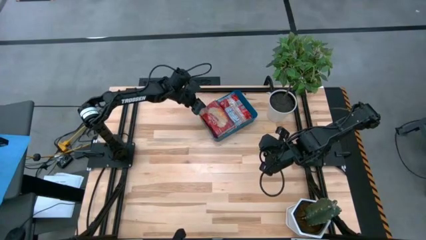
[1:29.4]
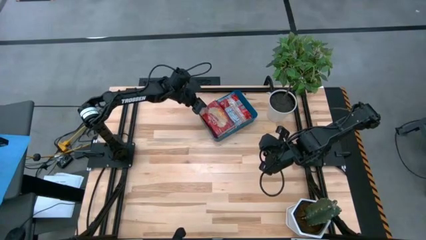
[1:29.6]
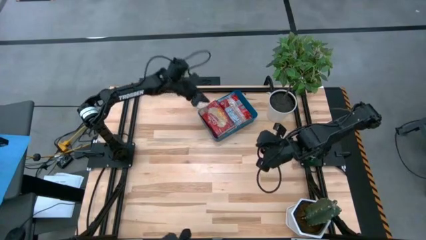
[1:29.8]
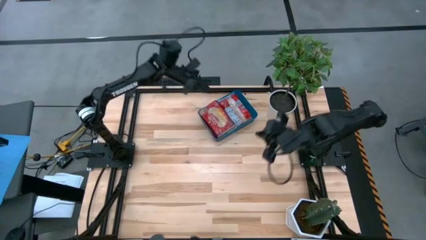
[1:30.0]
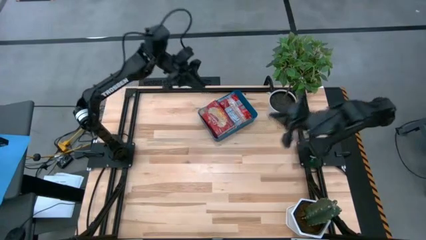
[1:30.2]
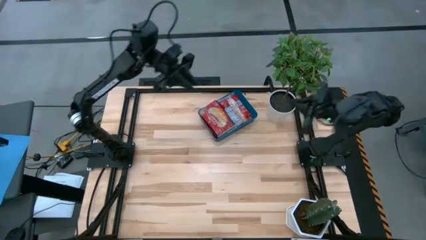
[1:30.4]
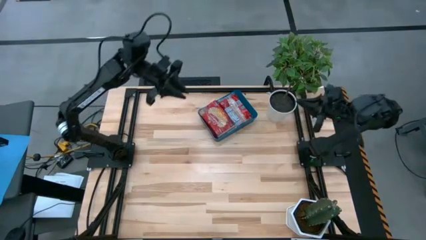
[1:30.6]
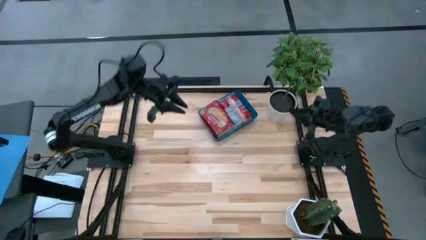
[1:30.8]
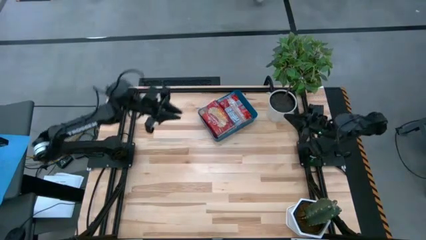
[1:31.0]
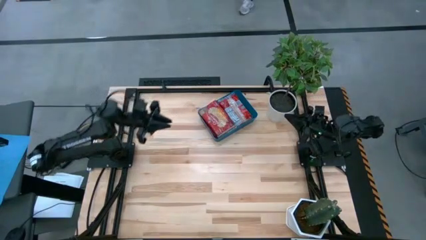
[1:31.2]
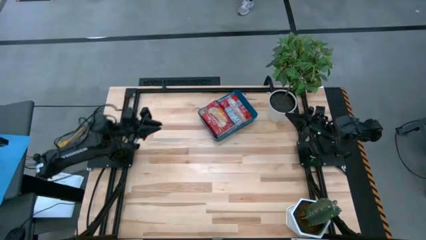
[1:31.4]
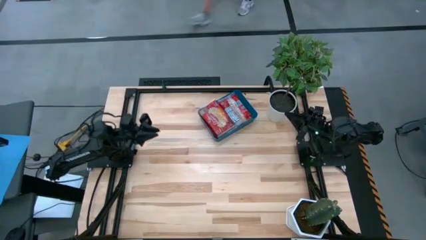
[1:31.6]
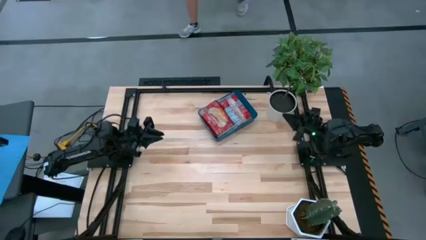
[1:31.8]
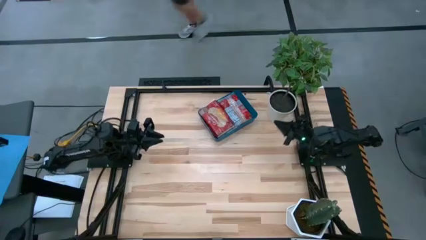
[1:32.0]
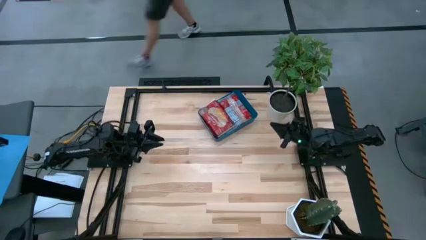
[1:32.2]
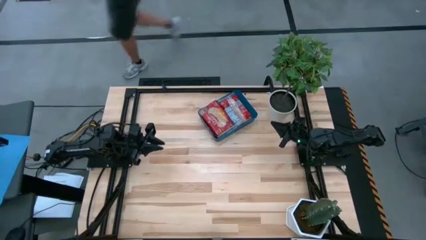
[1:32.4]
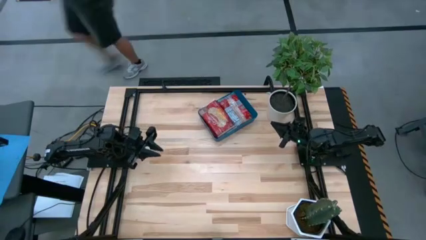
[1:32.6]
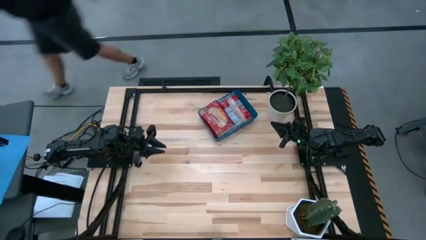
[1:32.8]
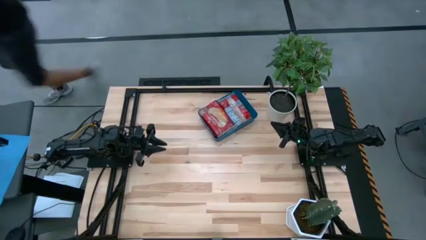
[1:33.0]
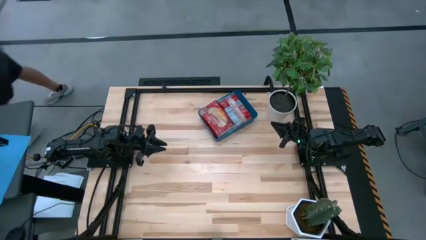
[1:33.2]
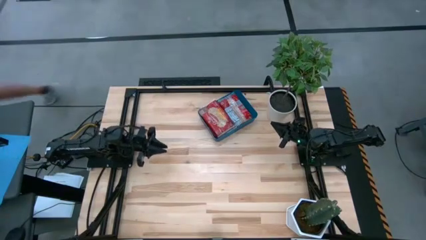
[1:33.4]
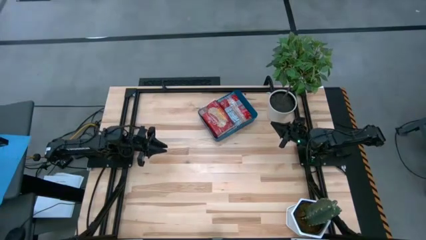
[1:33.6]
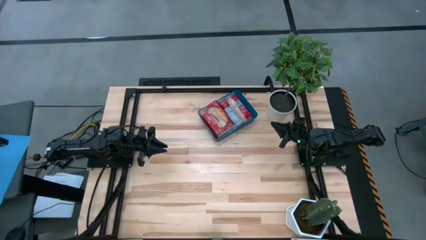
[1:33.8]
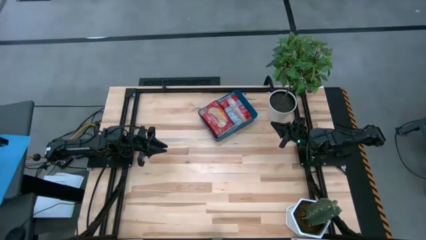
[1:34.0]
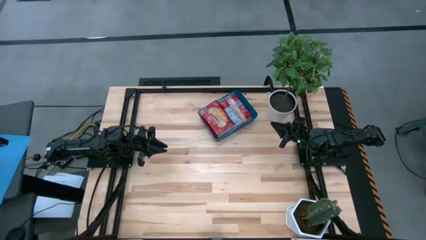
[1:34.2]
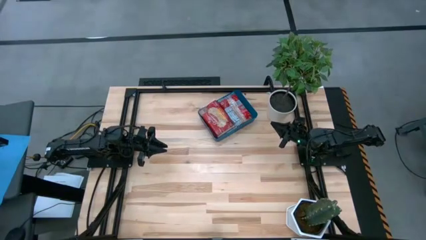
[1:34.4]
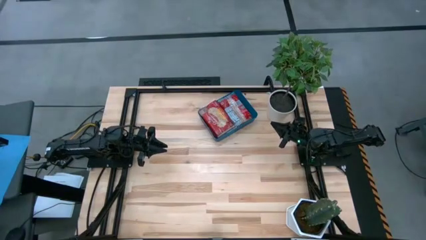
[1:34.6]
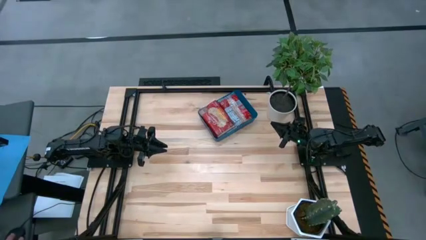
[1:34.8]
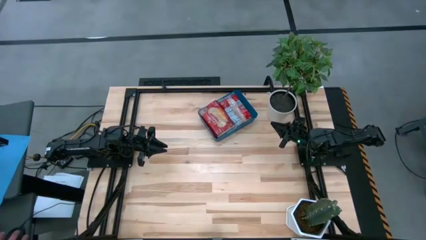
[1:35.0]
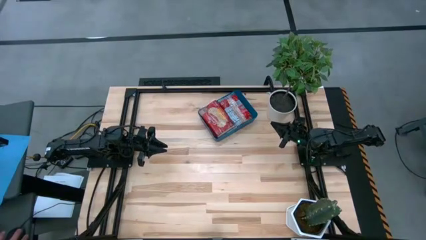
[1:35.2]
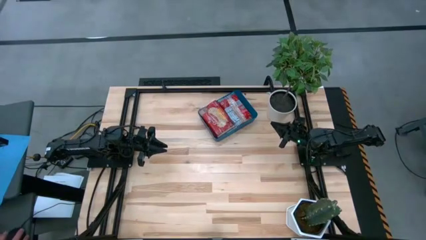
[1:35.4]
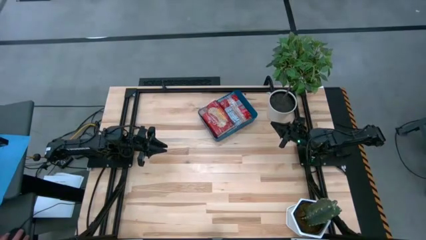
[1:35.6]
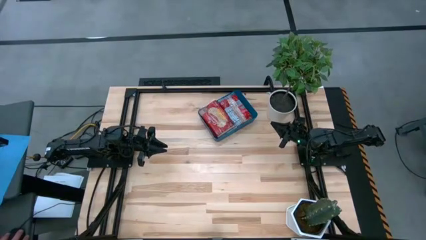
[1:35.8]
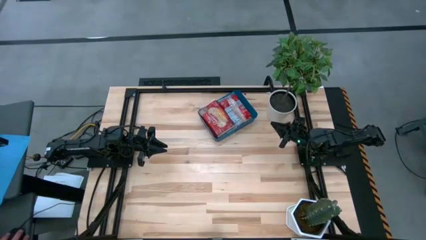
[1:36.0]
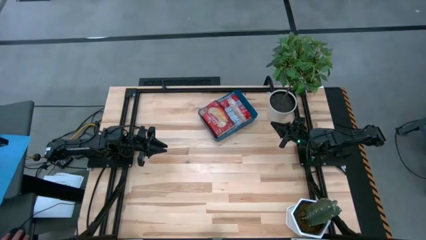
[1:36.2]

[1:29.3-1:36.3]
Task: Sort popcorn bags into baskets
Return to Home Position

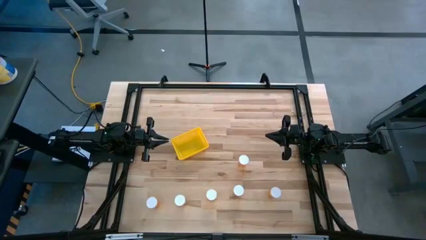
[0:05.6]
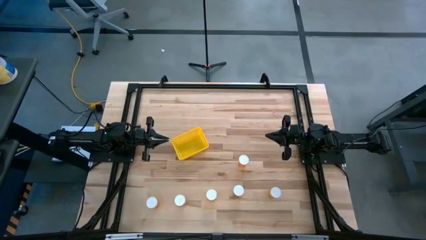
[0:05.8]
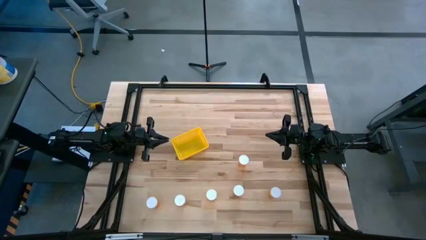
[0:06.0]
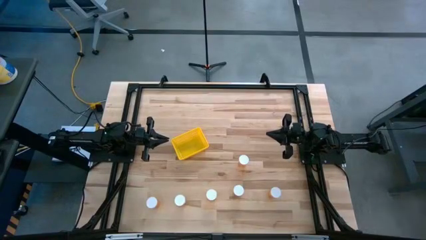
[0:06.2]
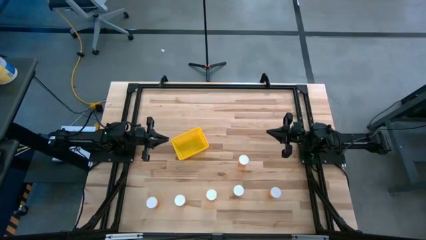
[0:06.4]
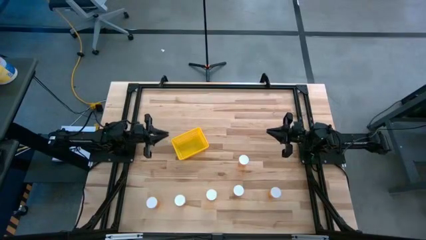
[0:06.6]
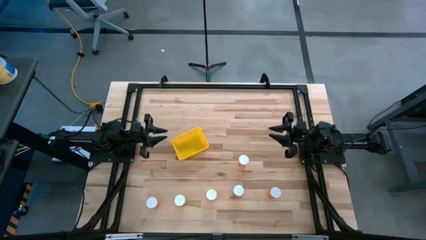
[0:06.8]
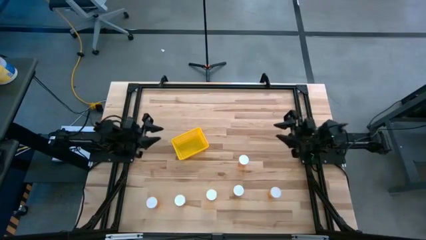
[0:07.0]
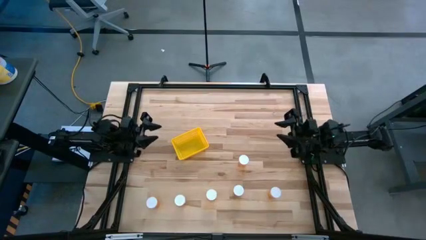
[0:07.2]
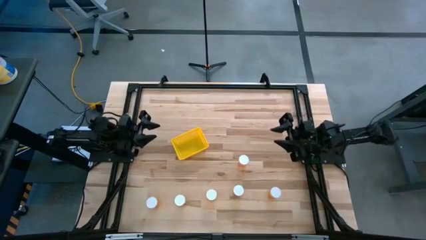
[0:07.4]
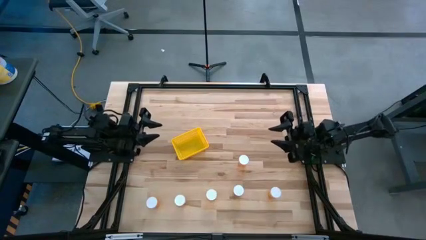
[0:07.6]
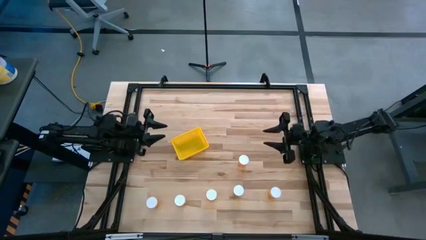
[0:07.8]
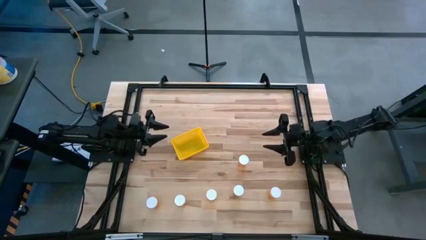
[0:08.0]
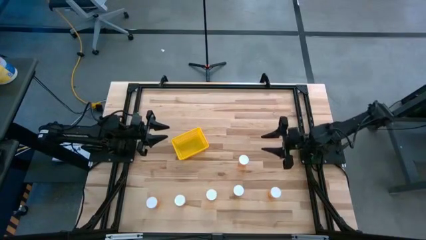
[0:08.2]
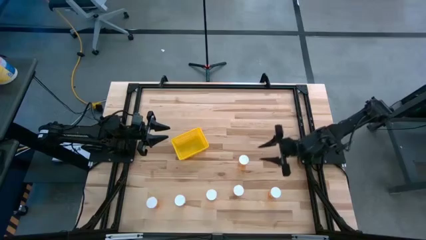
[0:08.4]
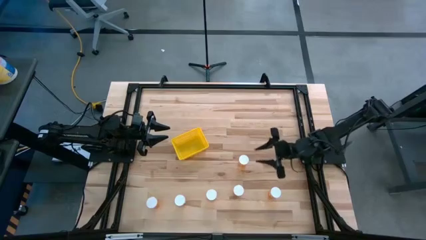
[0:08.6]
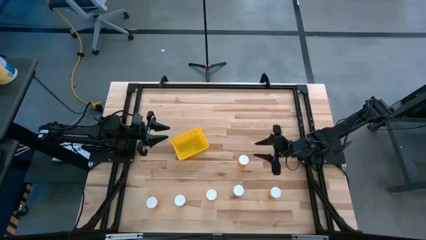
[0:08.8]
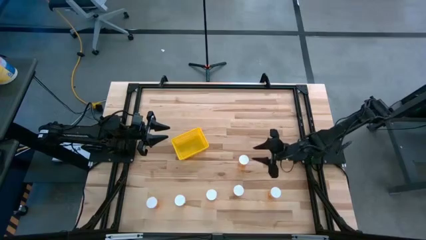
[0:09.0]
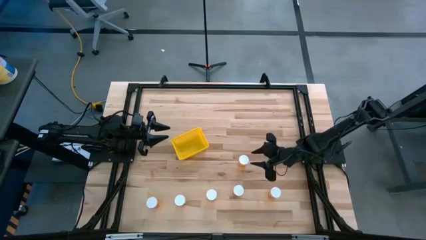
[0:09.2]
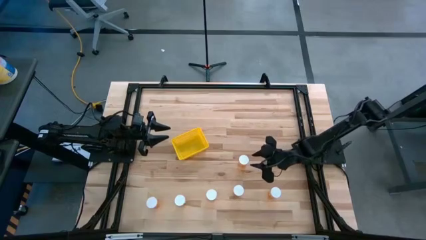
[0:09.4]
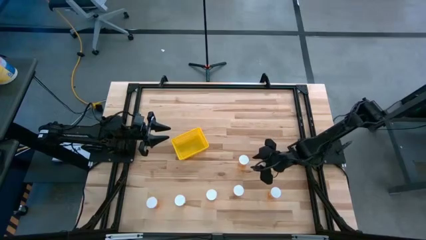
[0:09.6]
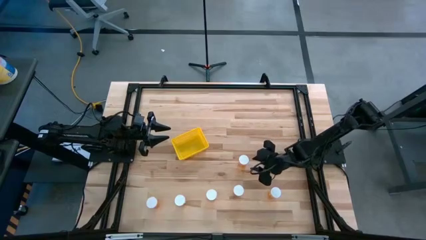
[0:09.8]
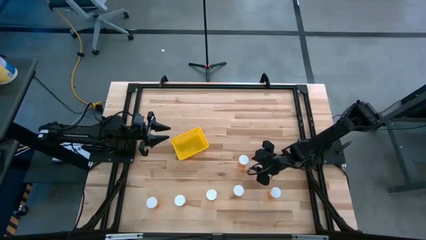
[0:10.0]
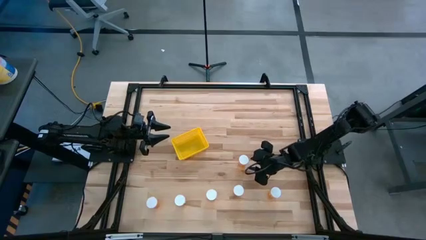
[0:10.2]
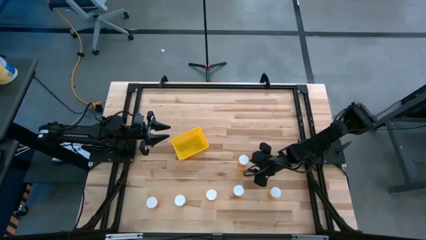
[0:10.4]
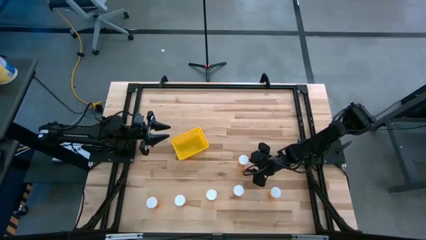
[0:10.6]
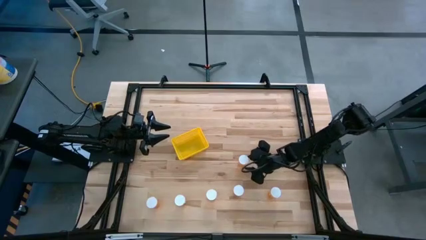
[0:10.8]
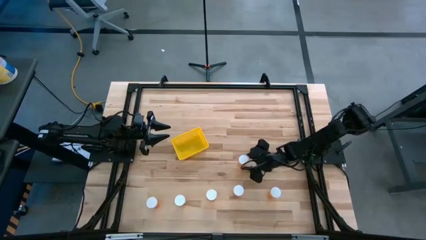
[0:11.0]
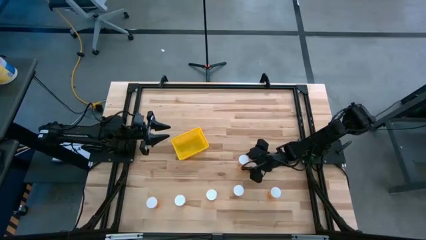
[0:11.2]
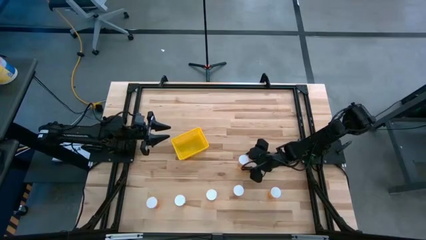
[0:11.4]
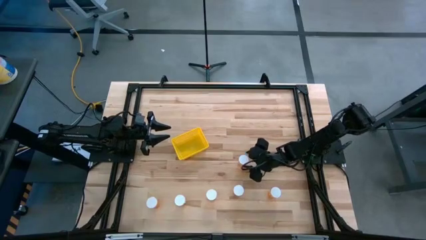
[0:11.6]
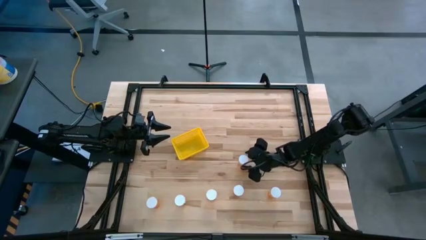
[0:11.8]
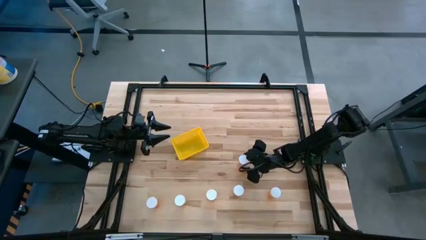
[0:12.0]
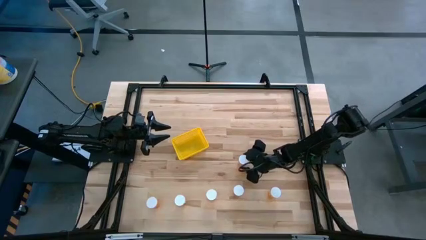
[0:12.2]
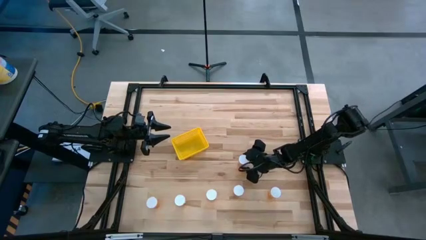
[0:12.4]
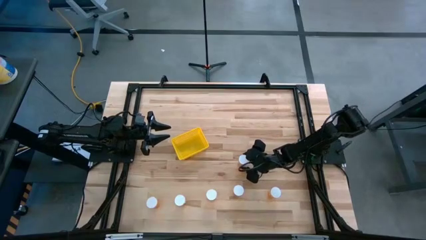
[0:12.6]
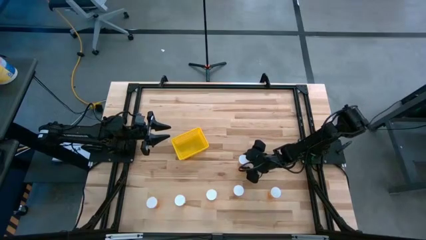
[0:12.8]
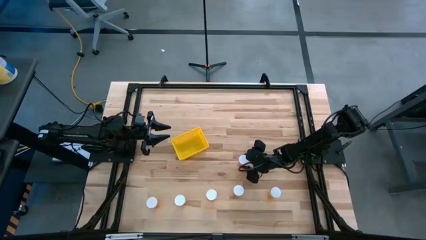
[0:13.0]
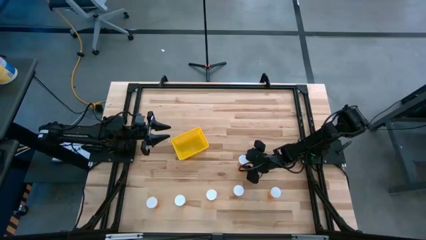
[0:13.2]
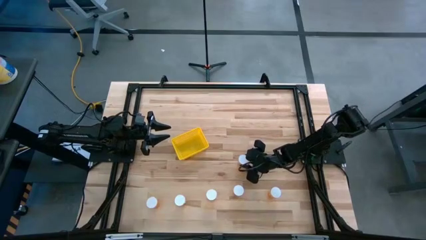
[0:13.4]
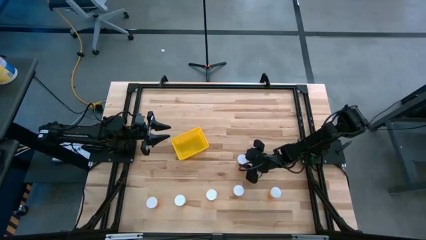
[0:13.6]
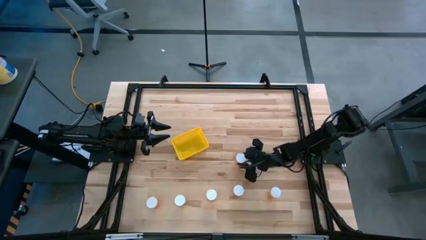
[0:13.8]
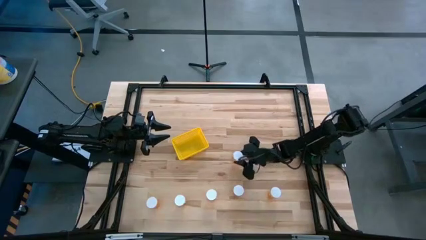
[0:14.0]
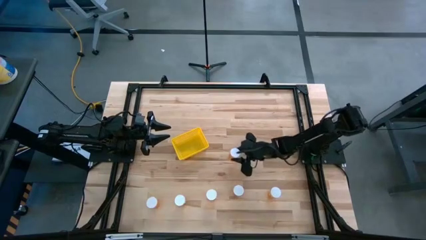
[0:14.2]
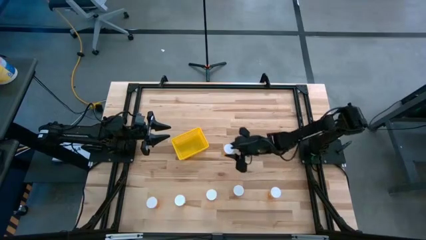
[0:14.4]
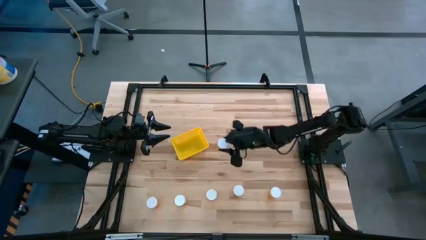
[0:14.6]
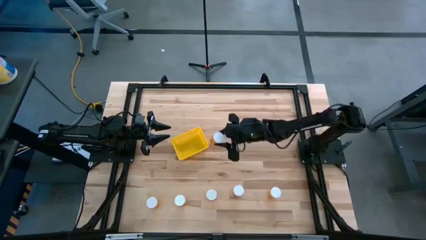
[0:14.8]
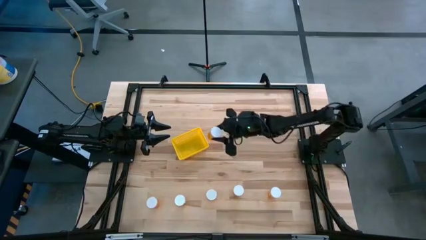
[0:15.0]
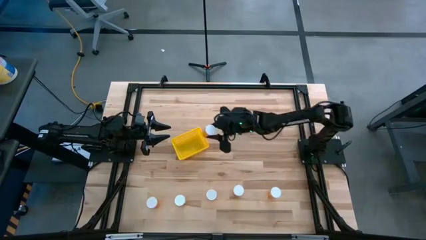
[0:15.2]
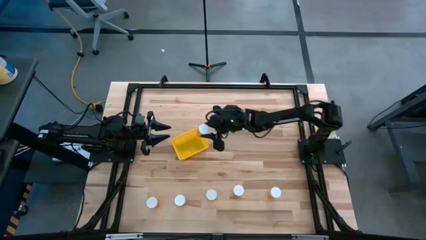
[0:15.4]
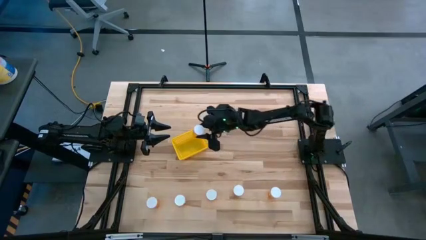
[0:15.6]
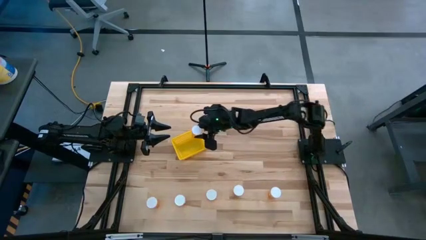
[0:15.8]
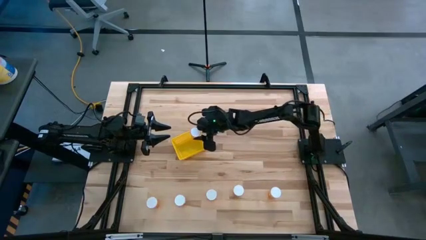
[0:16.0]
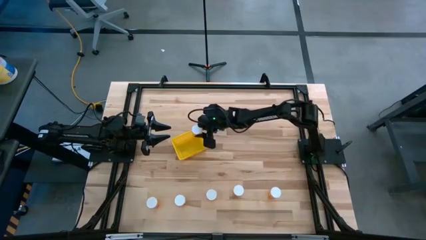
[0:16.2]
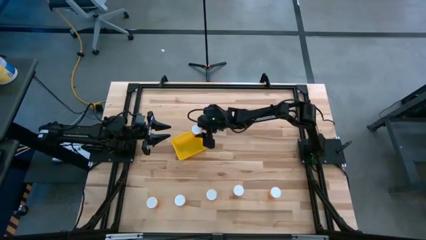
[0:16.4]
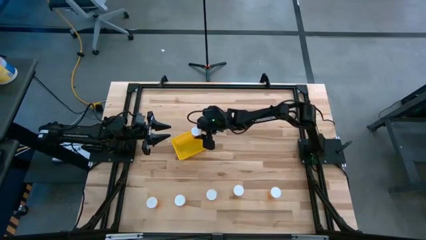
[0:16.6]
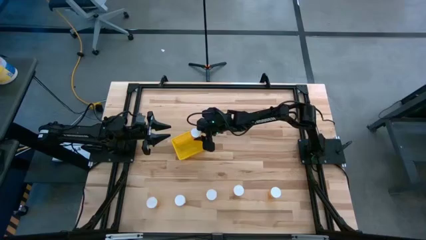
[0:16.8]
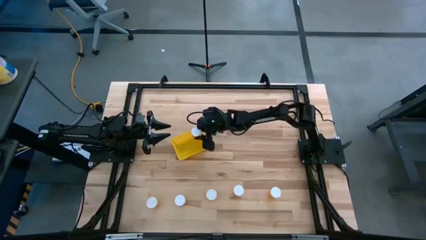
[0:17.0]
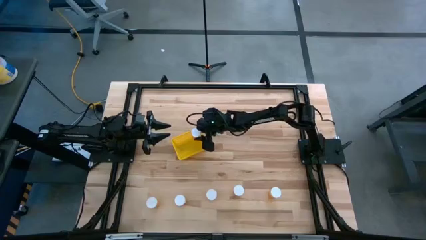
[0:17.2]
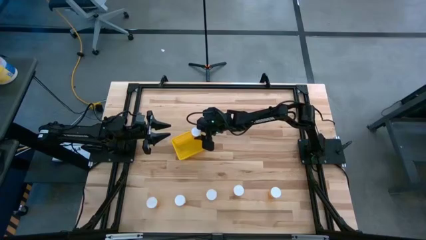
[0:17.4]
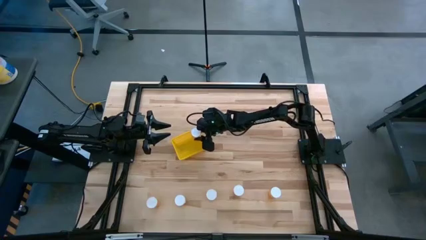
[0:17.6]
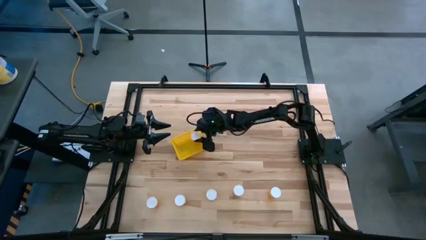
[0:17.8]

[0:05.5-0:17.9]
Task: Pick and place pill bottles into a basket
Put the orange pill bottle into the yellow basket
